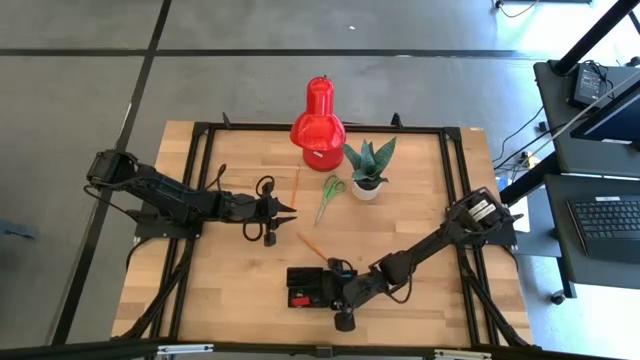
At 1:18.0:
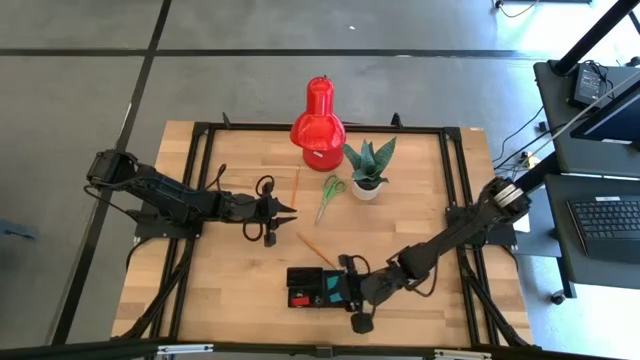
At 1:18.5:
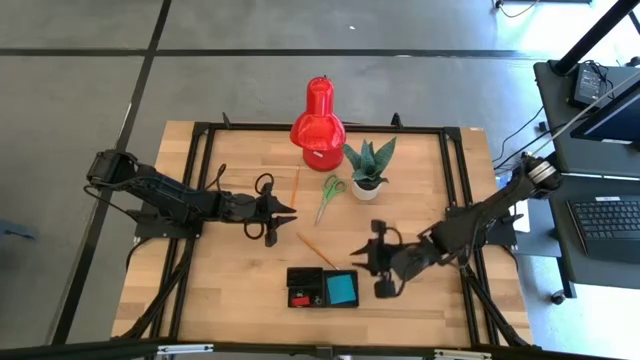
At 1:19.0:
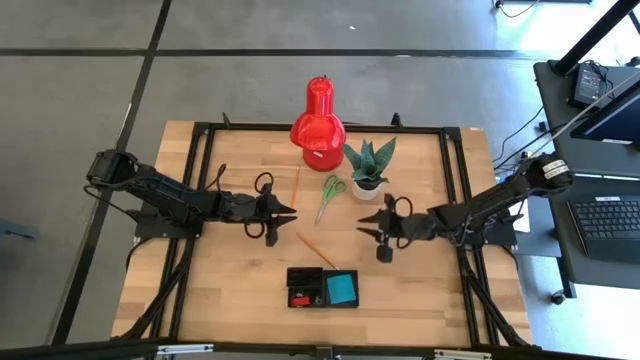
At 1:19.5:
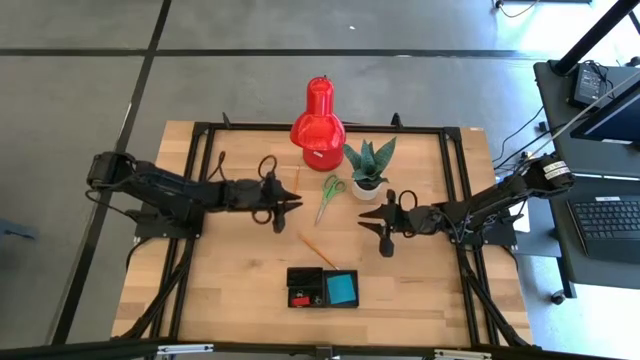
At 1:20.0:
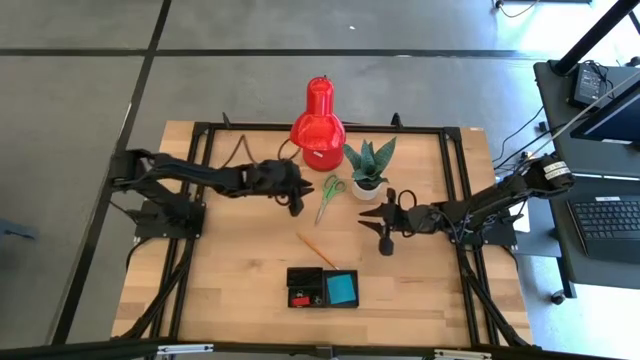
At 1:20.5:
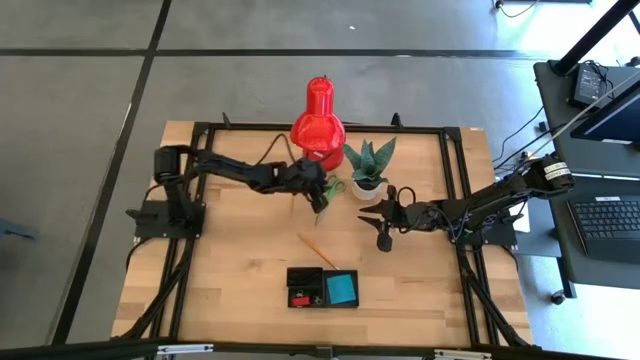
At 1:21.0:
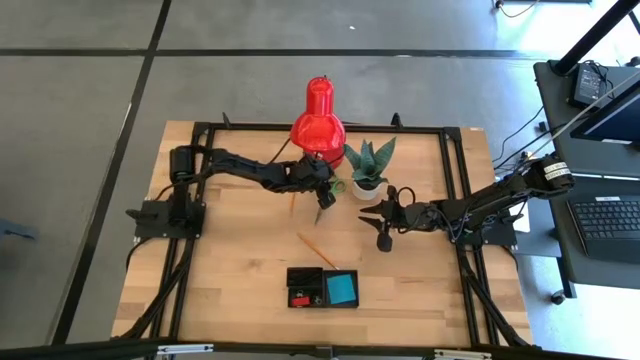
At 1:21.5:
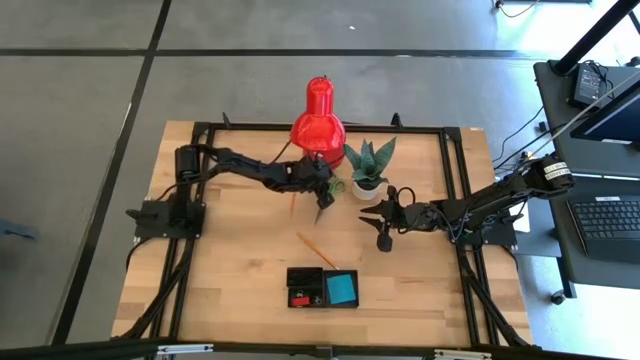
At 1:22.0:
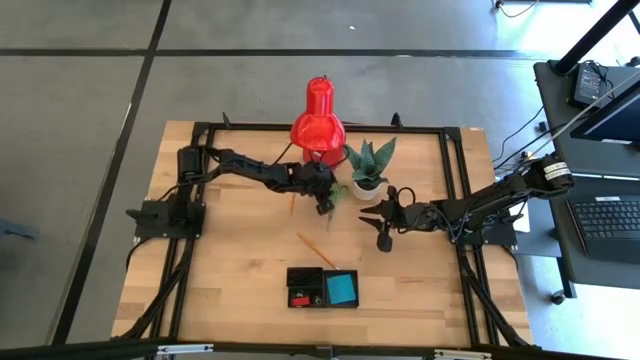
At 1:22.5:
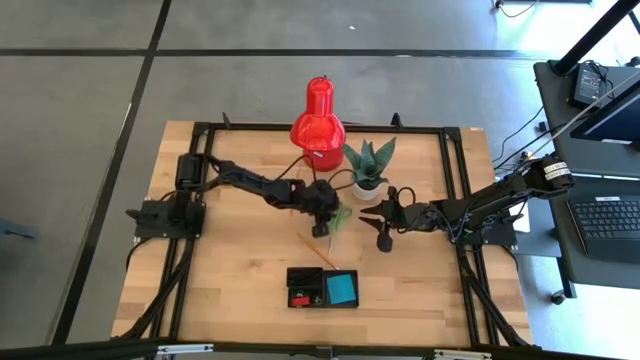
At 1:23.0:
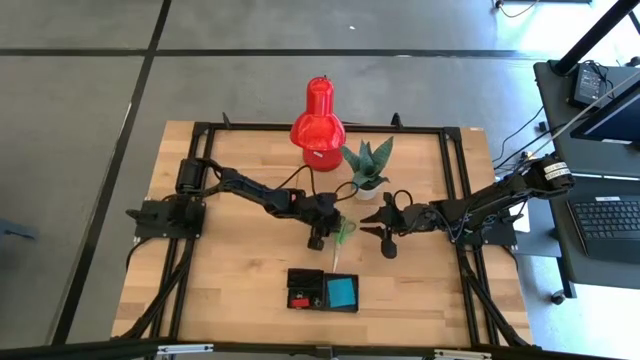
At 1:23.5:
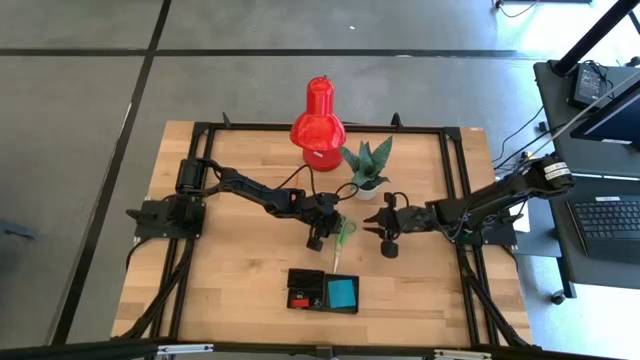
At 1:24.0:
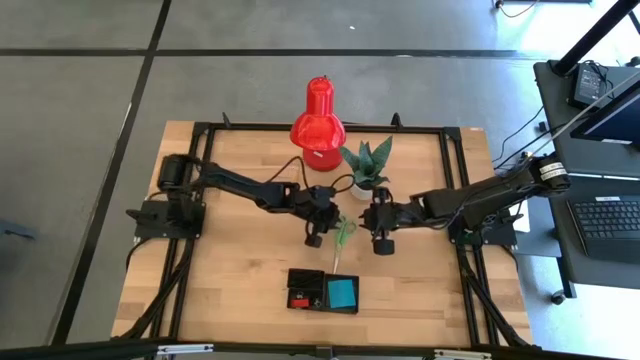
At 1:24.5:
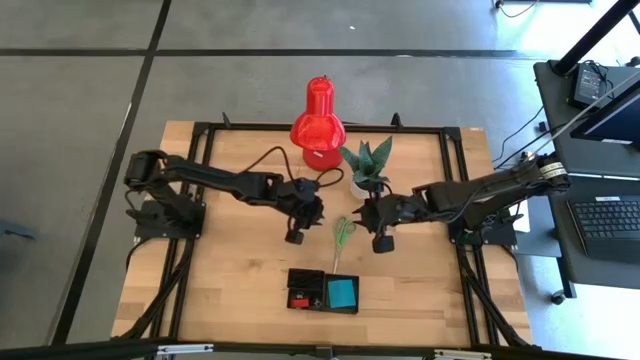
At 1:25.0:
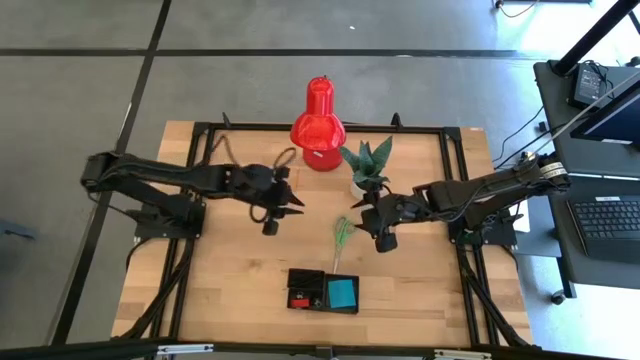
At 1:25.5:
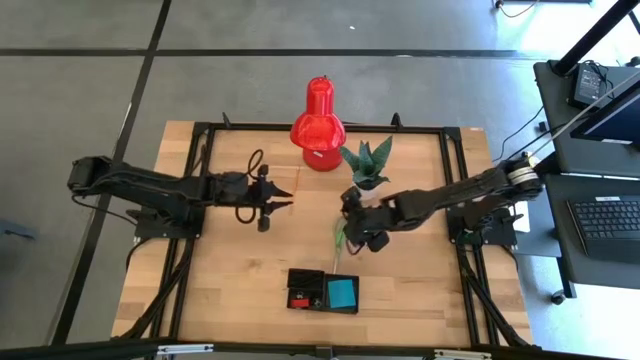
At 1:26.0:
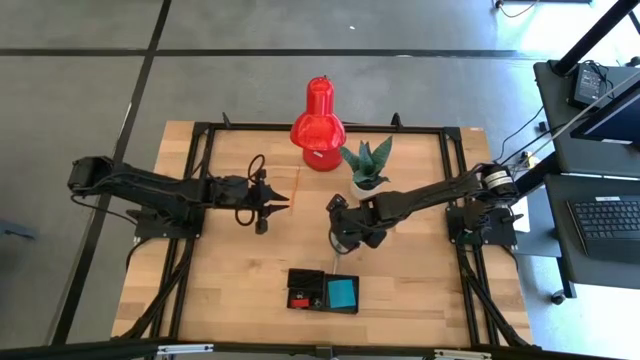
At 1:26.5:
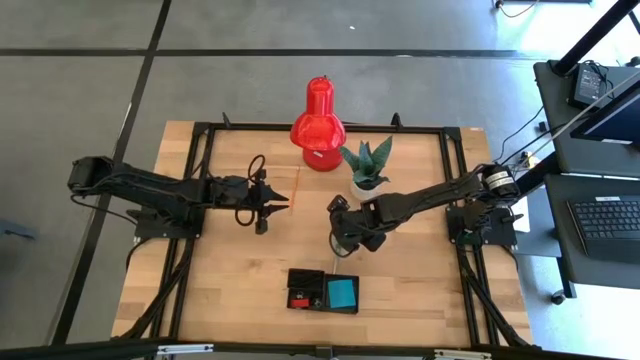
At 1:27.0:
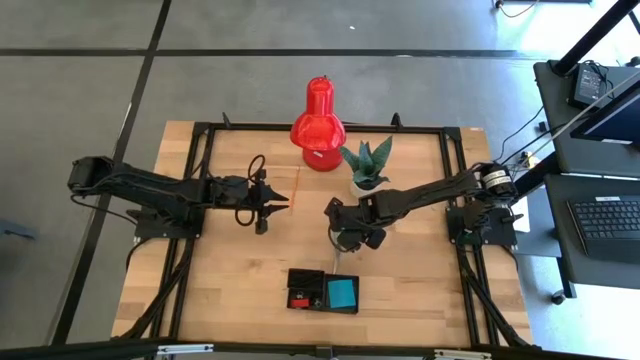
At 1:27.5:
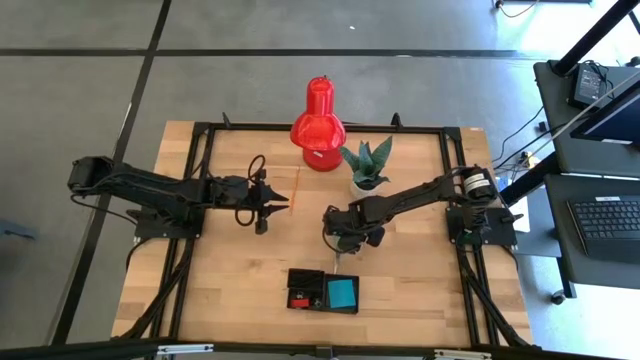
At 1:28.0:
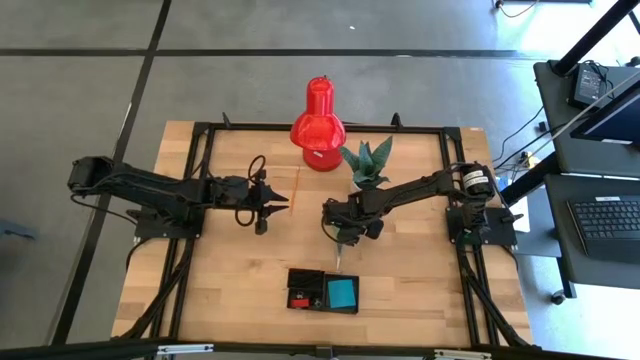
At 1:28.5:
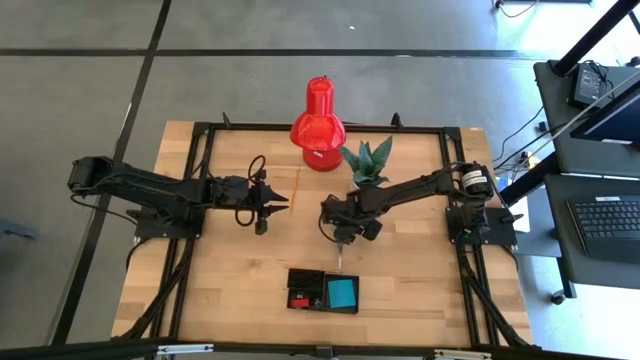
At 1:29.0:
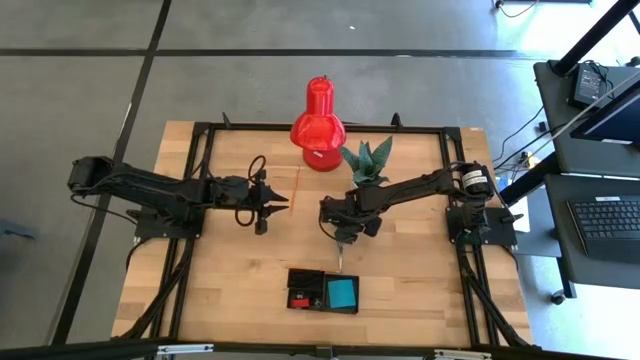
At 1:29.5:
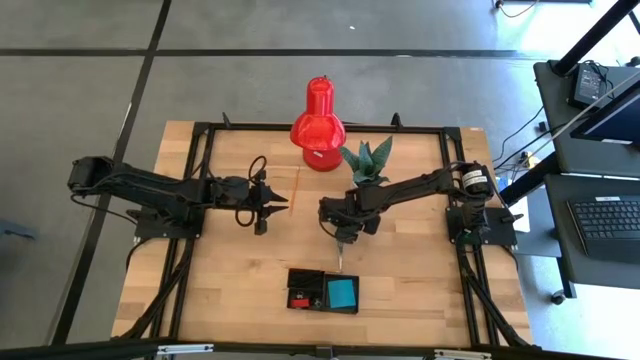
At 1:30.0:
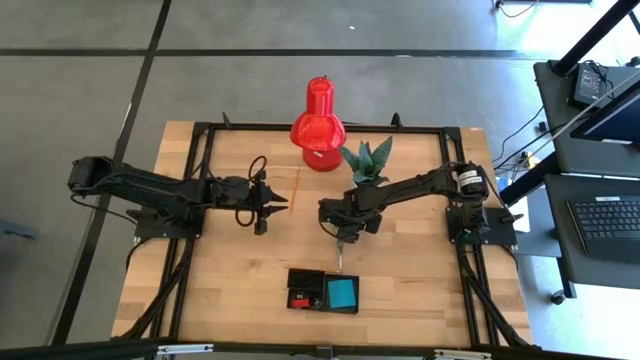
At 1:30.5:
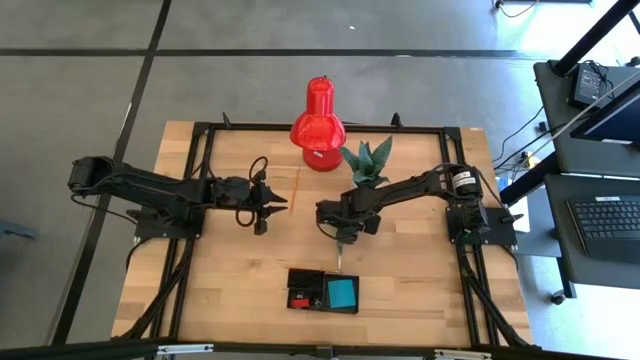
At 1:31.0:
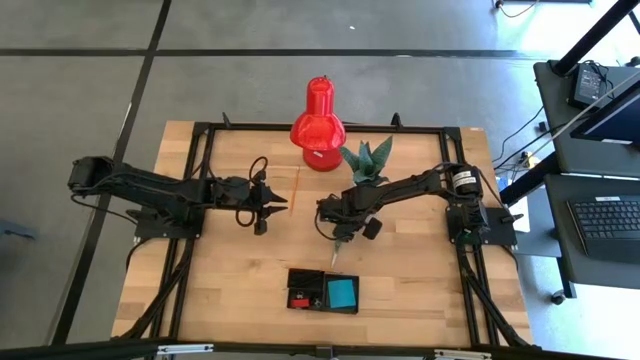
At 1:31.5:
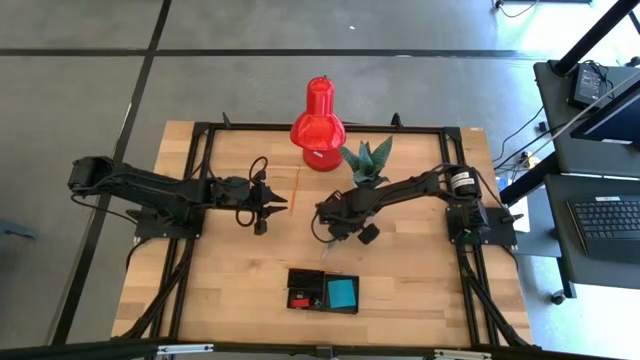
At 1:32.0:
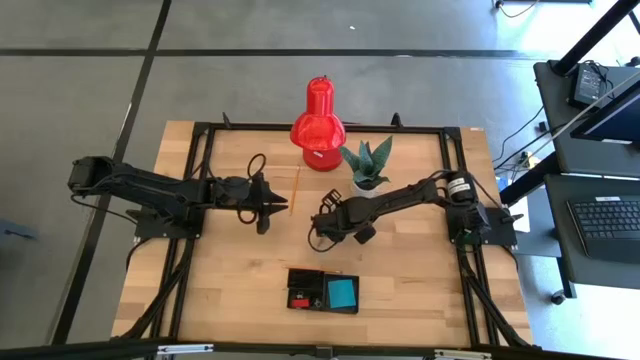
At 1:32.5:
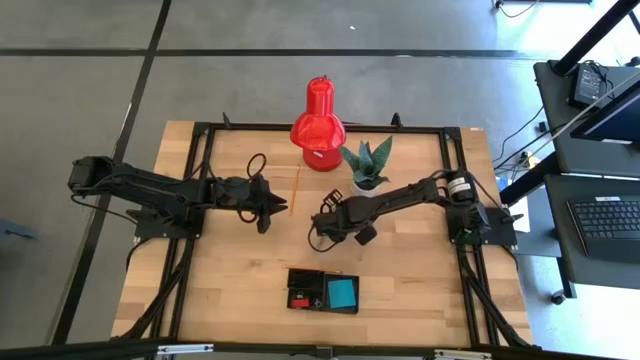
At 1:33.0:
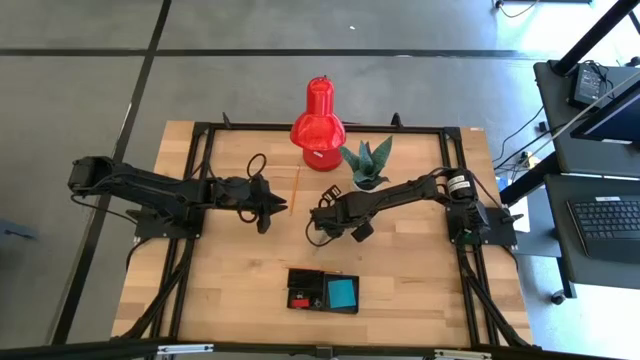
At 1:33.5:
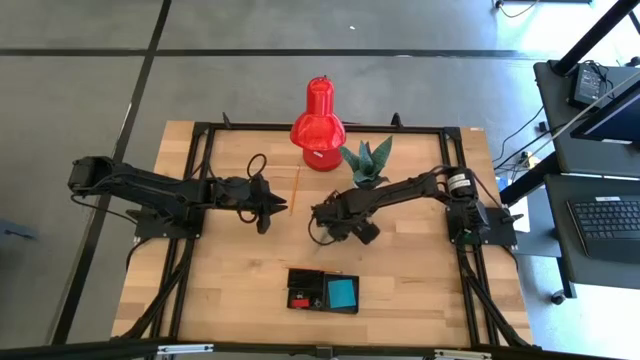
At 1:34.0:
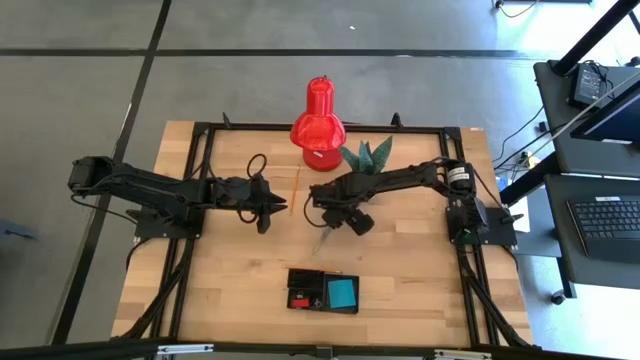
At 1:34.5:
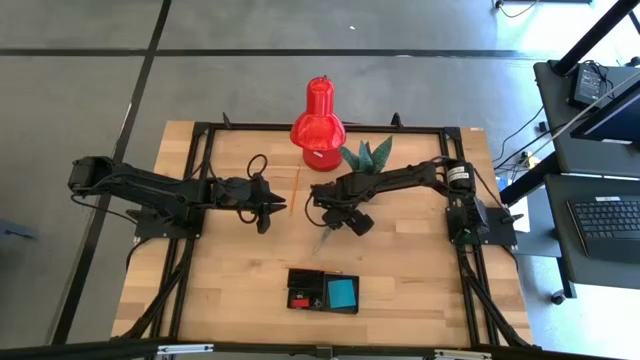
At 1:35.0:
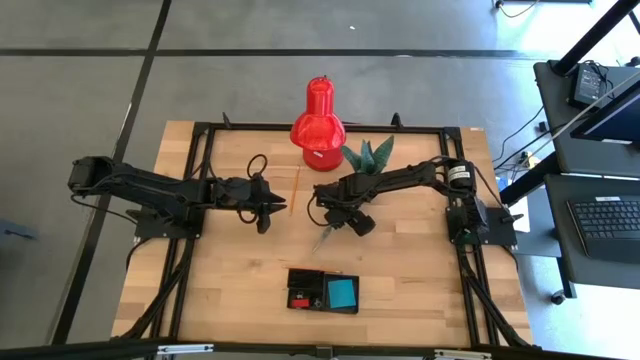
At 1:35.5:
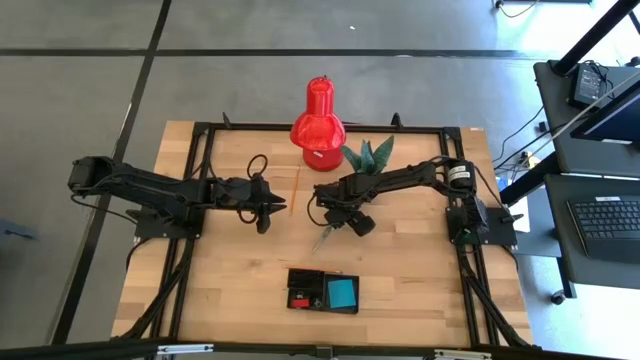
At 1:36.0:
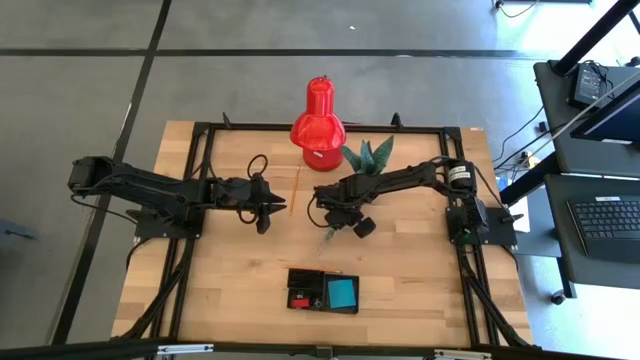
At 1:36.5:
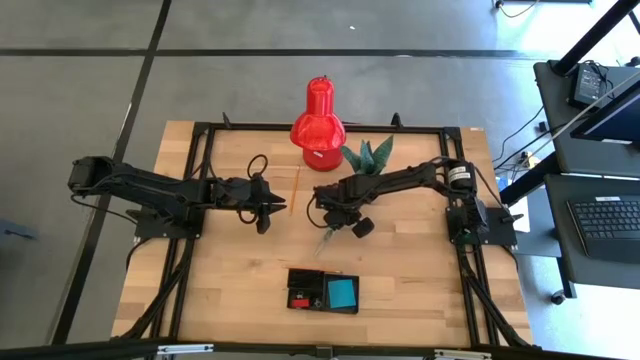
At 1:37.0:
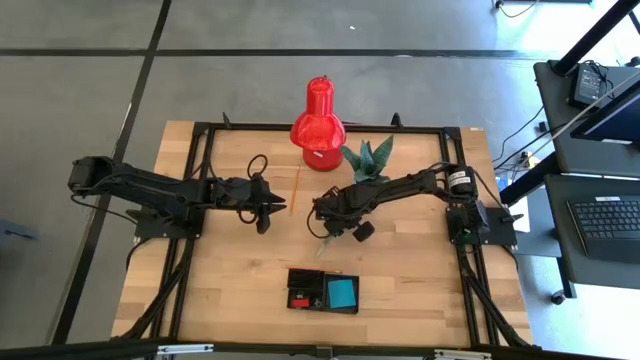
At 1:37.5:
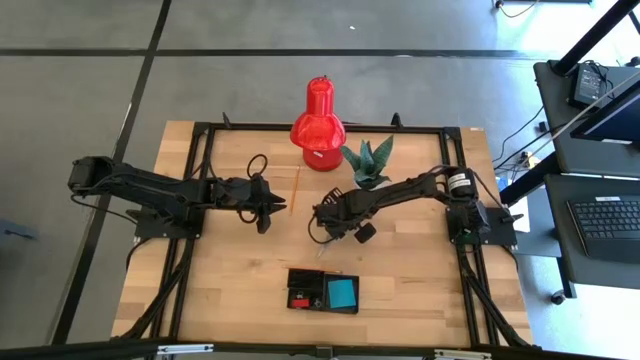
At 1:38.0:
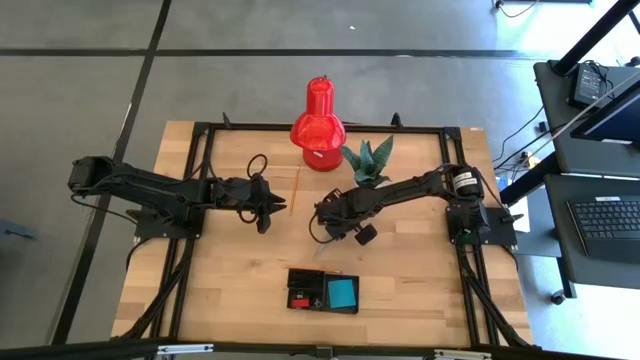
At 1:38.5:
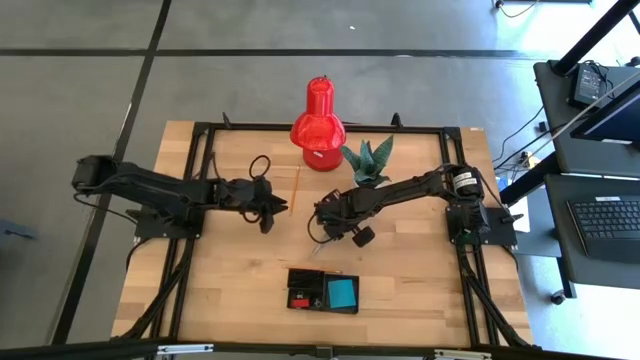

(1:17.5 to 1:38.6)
Task: Pick and place office supplies into organizer
Put the green scissors into the desk organizer

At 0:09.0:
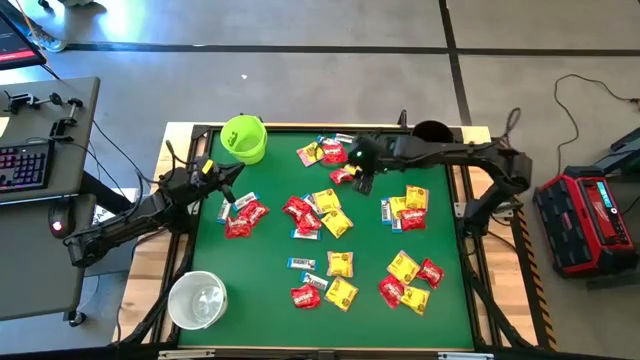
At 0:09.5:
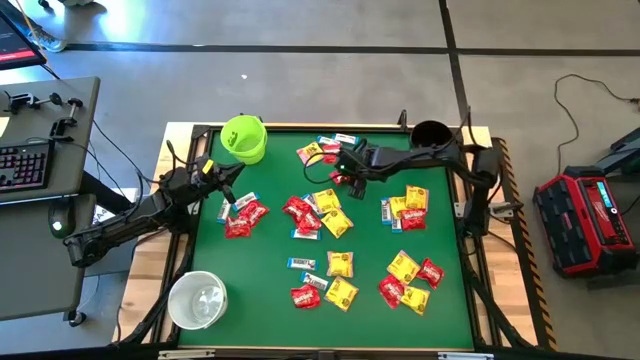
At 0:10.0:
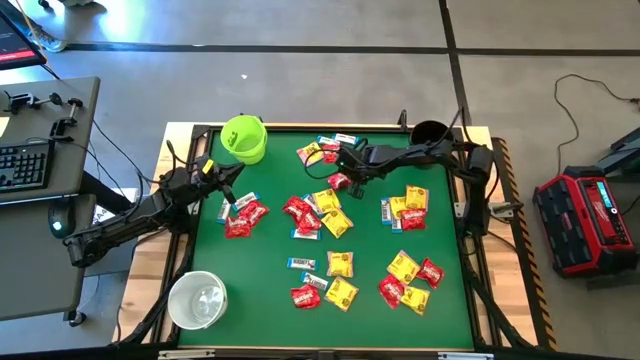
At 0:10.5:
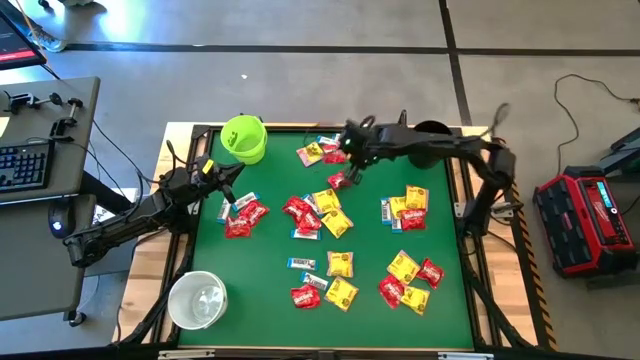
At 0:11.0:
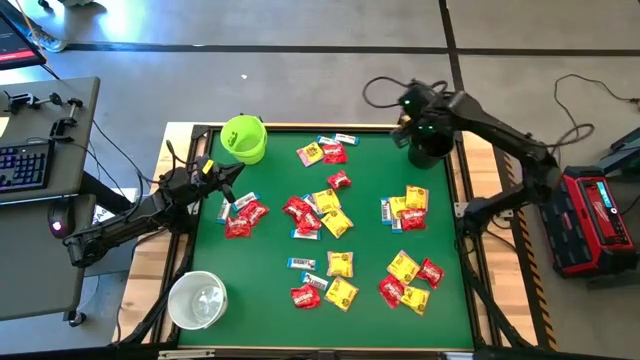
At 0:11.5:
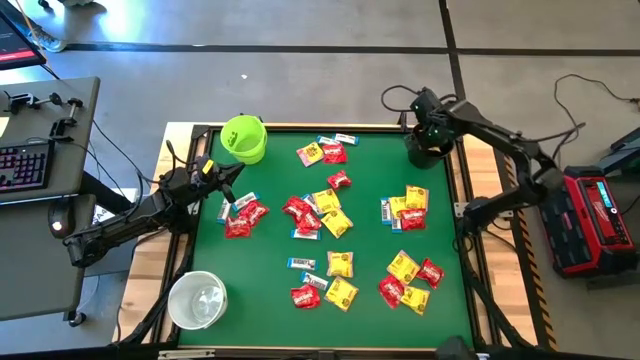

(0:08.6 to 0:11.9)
Task: Sort candy by brand, put in halloween buckets
Put the yellow candy into the black bucket
